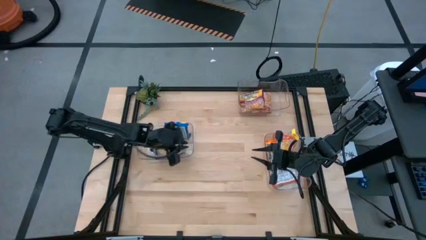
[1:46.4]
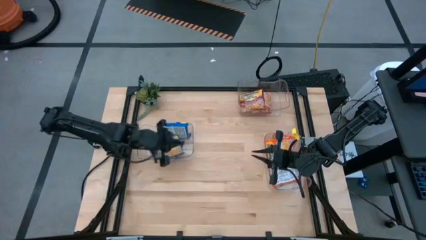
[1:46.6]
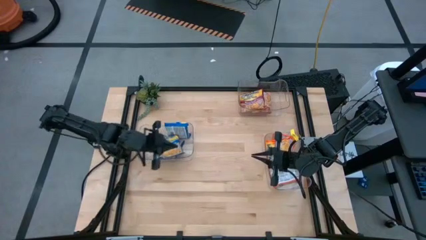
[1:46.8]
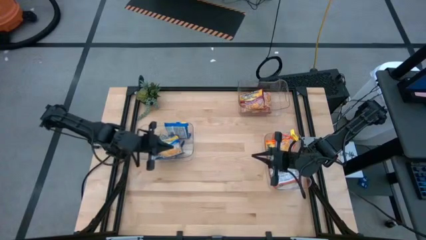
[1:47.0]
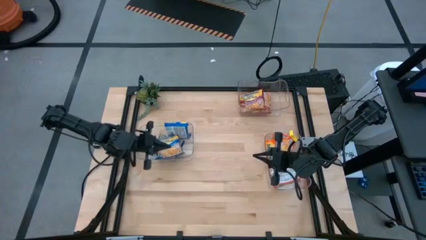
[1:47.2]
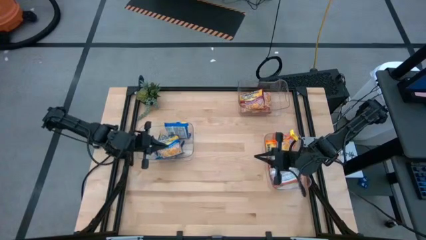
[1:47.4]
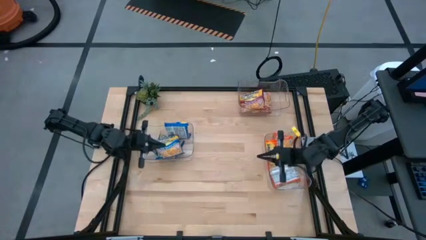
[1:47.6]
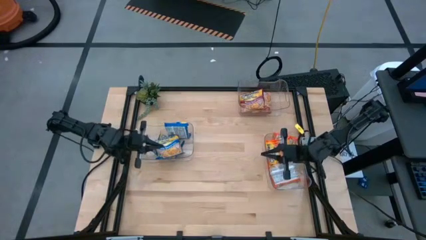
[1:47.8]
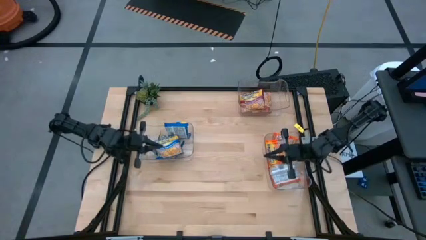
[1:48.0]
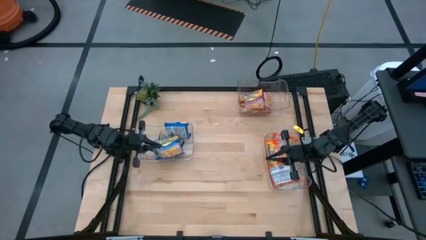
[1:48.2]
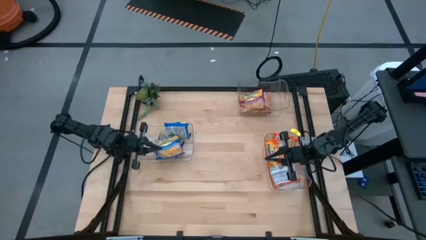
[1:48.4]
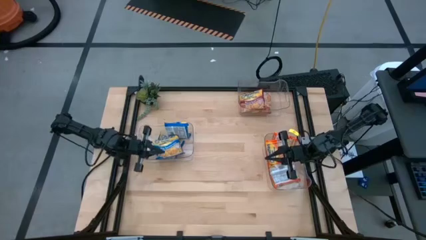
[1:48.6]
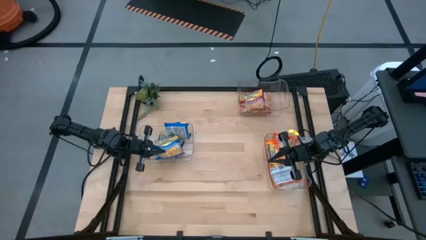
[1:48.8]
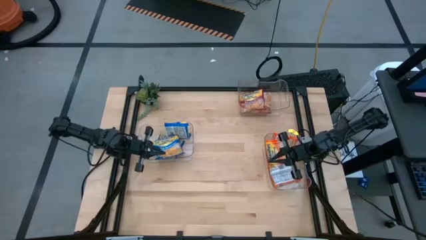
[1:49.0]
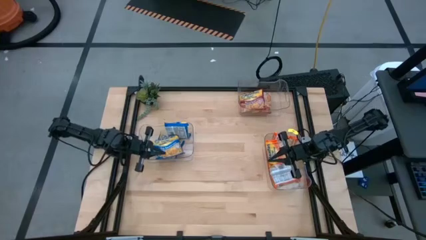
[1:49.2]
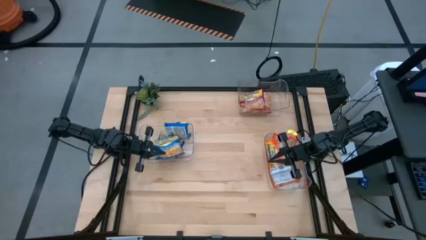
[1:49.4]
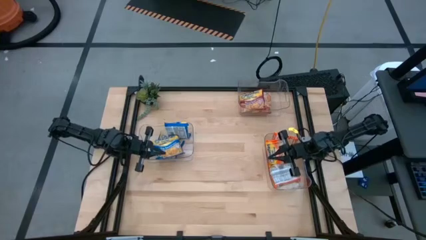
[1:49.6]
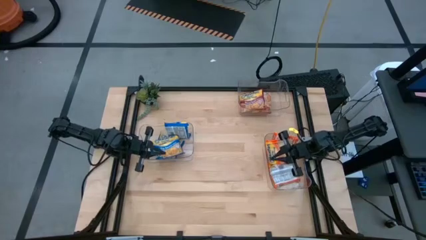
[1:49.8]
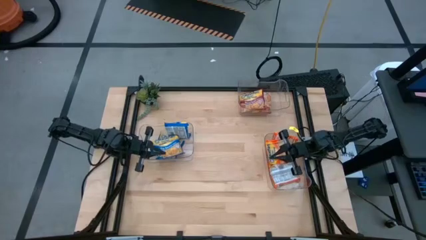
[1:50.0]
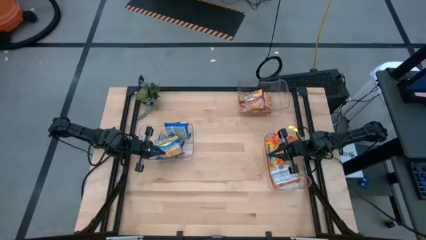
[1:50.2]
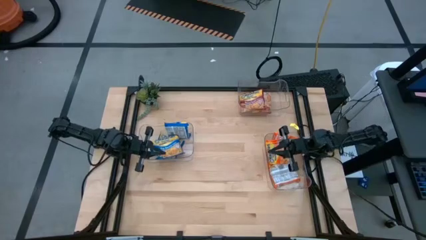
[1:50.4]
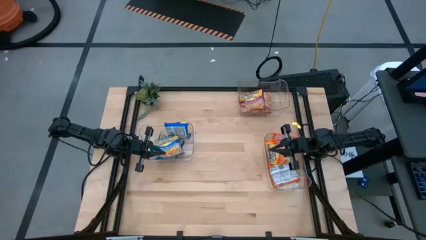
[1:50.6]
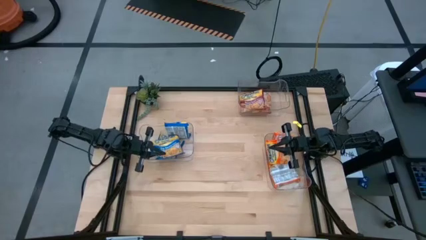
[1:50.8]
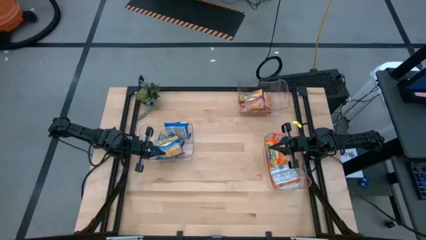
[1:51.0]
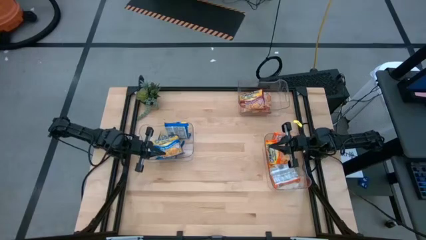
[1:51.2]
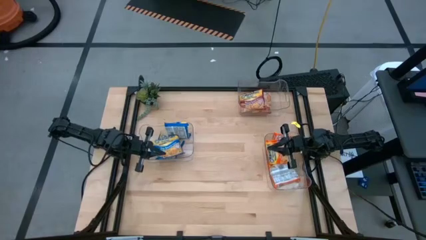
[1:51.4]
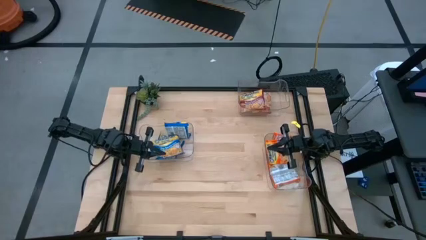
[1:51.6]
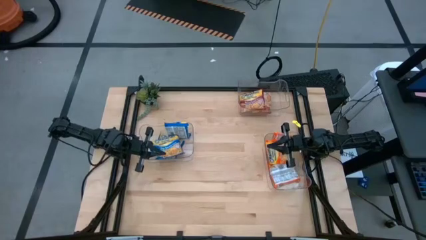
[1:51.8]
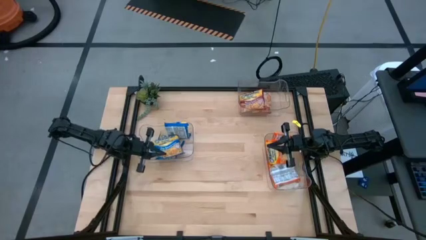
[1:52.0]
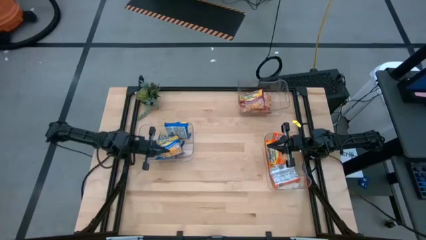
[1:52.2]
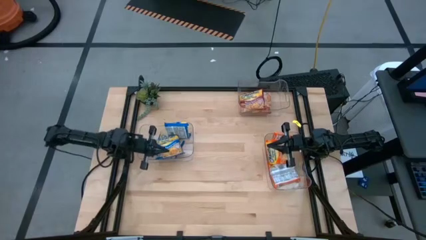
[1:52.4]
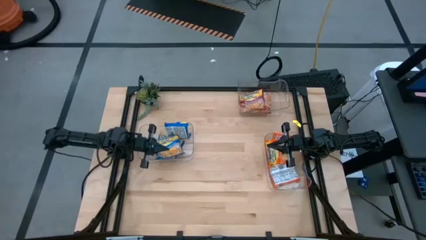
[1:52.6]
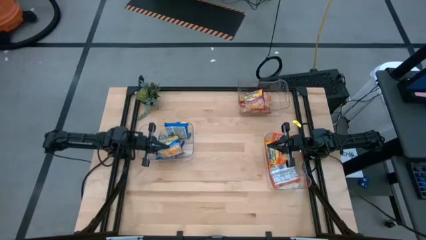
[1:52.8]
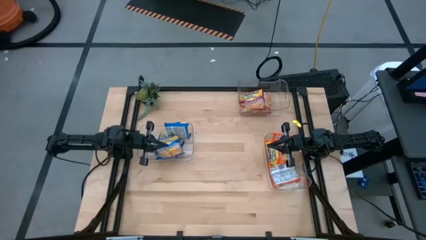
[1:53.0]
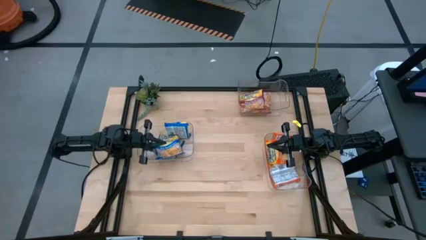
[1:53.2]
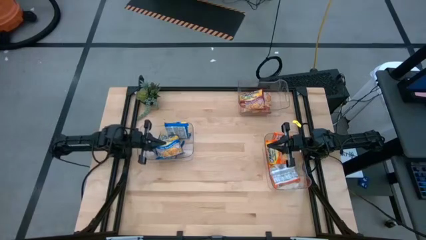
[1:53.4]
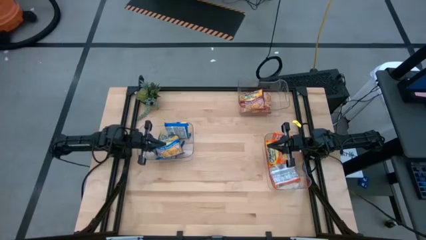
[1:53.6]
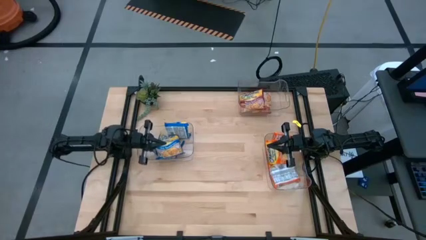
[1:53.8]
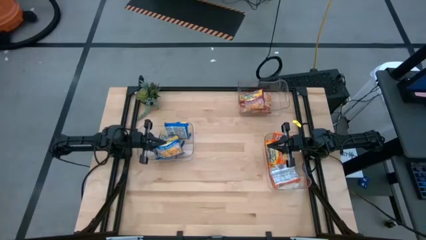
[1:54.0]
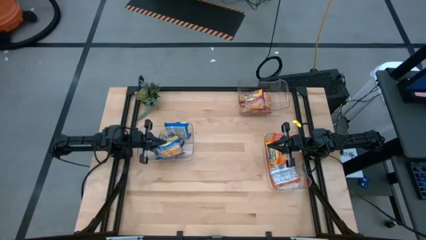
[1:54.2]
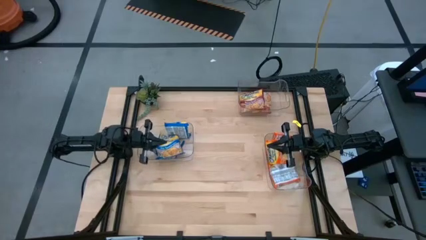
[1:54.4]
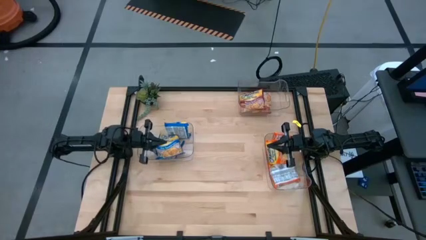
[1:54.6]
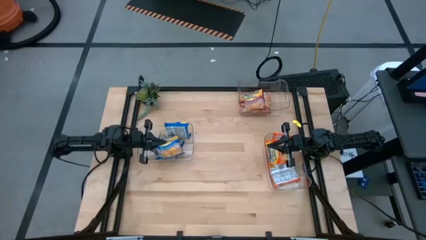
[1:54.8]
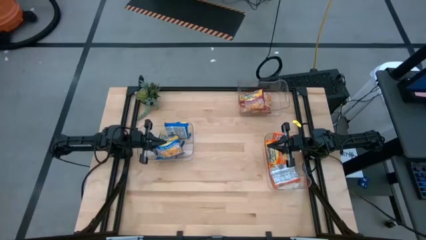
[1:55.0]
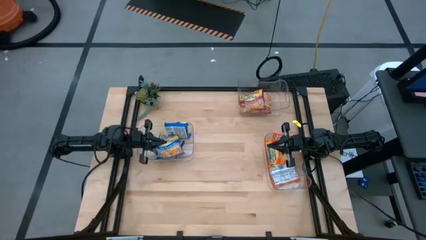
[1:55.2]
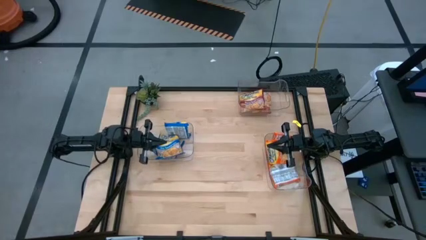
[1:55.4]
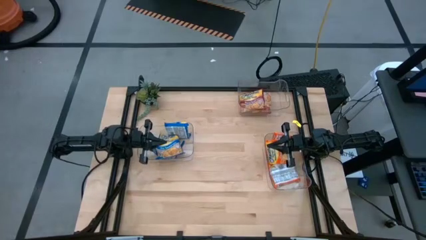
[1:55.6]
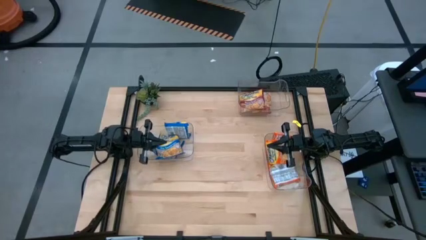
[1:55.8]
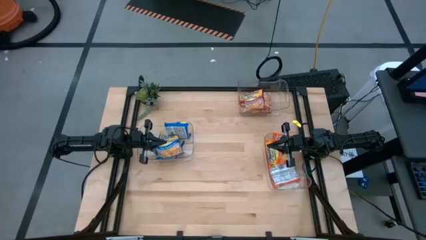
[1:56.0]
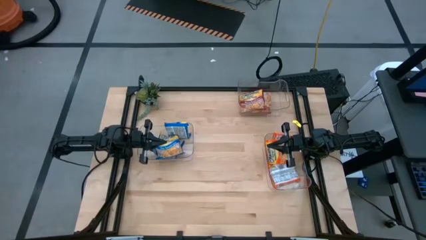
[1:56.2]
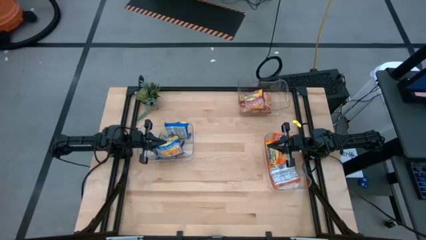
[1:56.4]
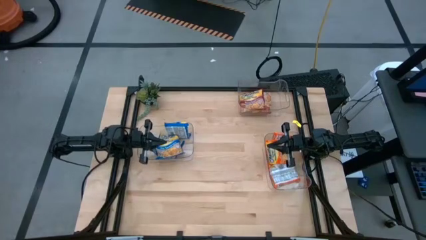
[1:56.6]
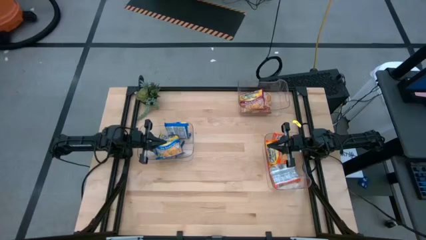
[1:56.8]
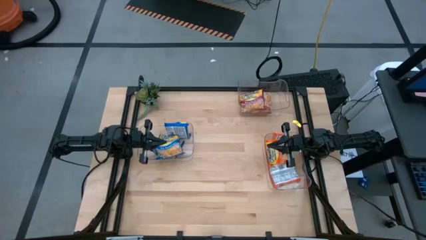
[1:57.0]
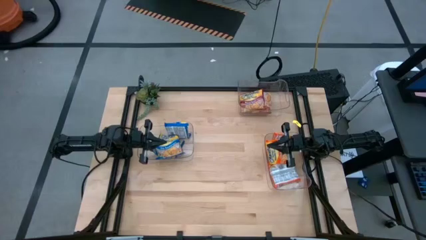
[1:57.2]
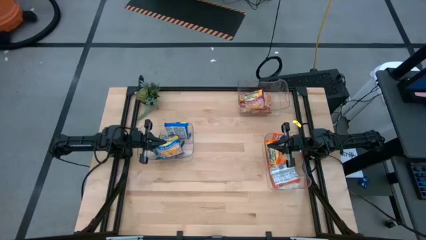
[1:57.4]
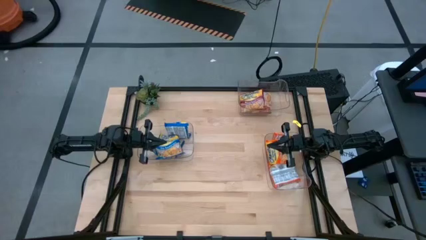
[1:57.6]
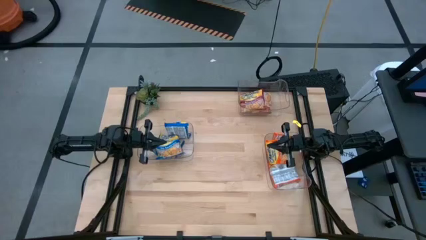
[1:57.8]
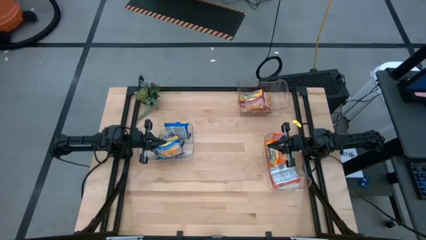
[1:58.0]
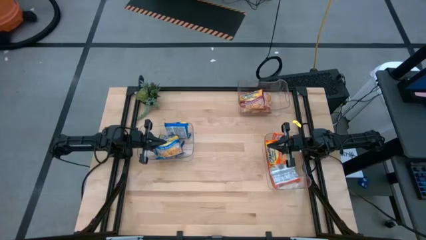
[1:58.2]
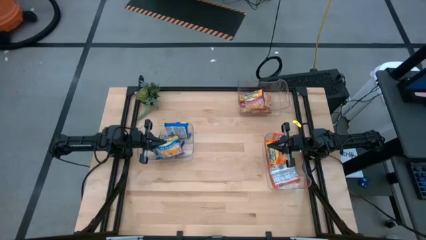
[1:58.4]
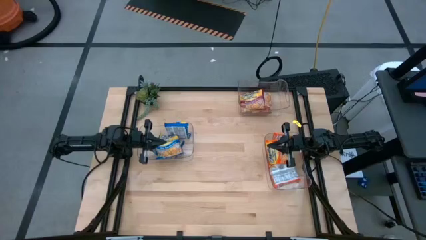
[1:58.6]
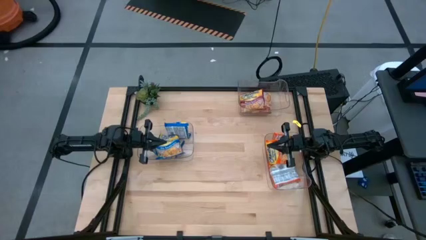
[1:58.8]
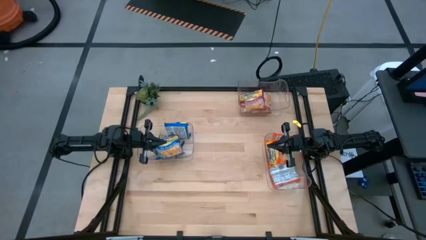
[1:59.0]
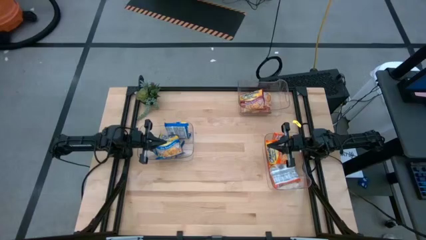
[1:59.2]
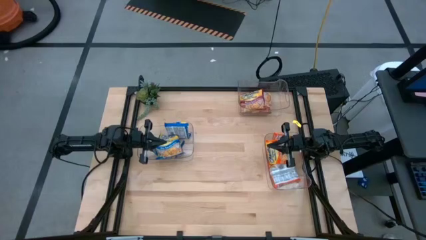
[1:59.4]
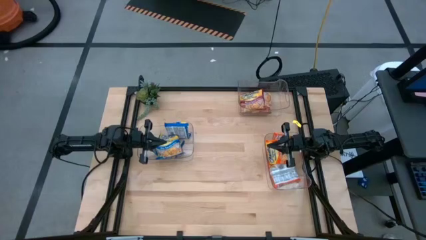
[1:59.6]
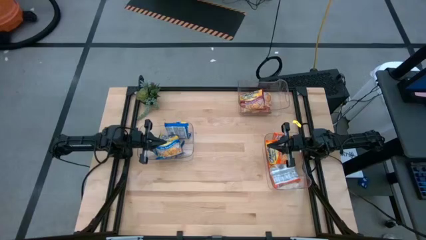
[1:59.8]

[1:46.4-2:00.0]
Task: Sort Maruchan noodles
Return to Home Position

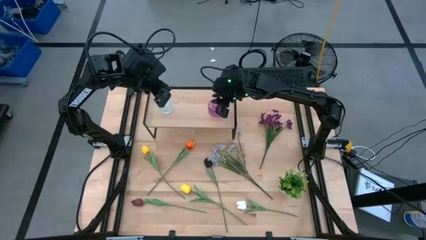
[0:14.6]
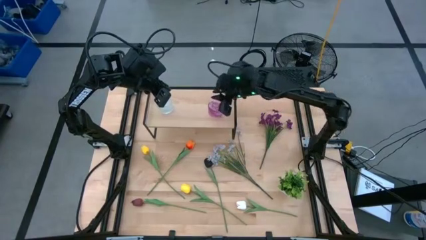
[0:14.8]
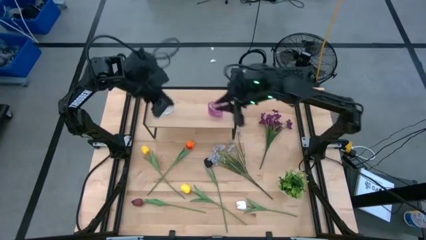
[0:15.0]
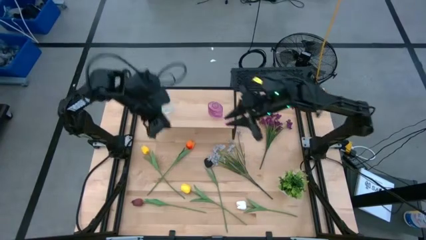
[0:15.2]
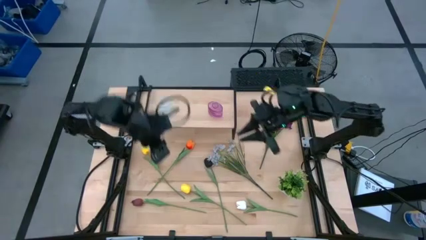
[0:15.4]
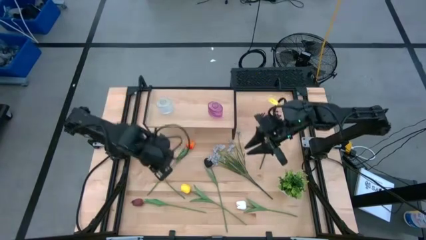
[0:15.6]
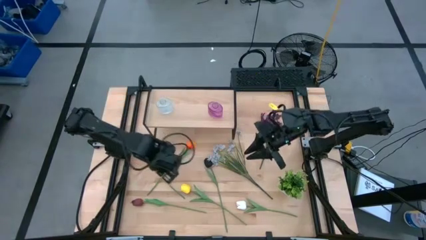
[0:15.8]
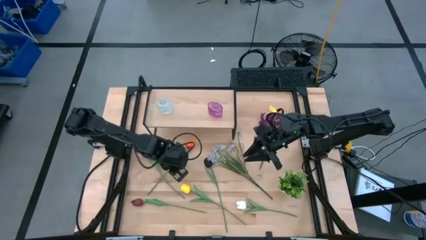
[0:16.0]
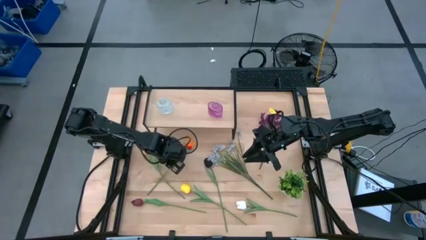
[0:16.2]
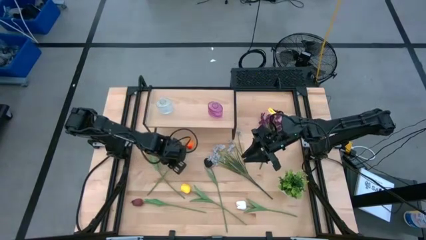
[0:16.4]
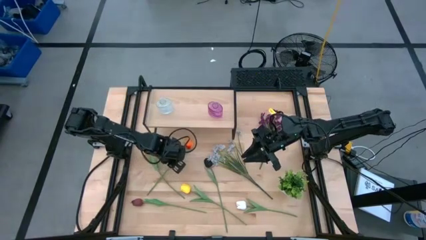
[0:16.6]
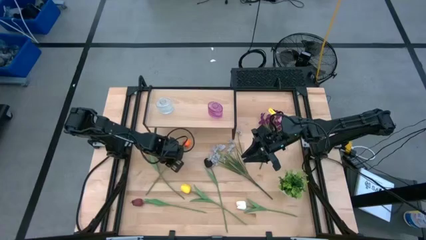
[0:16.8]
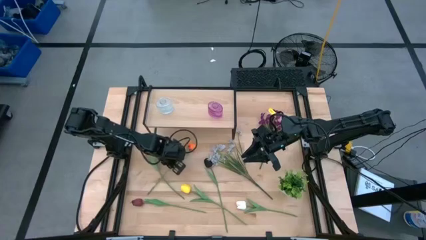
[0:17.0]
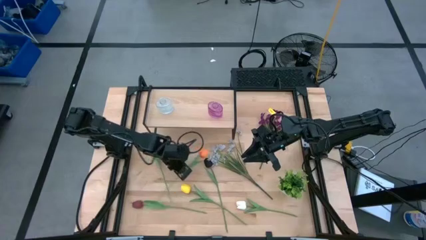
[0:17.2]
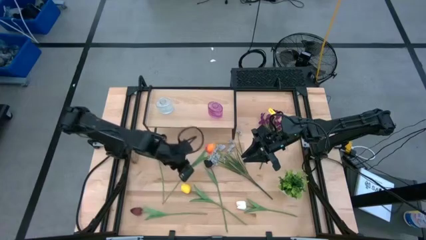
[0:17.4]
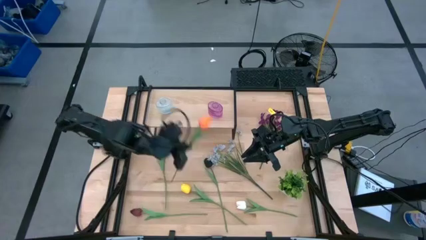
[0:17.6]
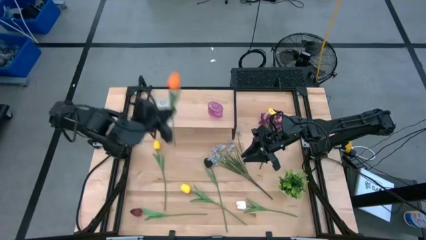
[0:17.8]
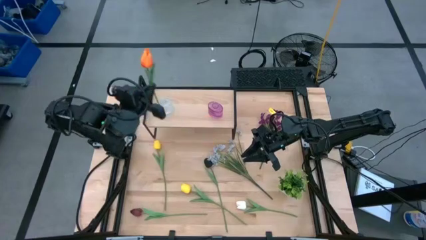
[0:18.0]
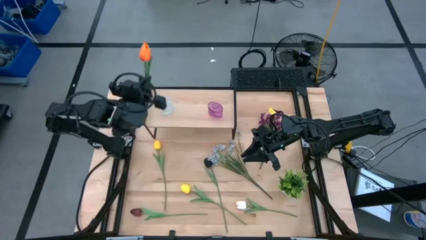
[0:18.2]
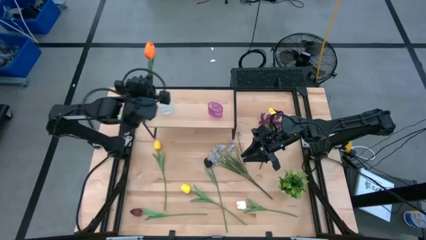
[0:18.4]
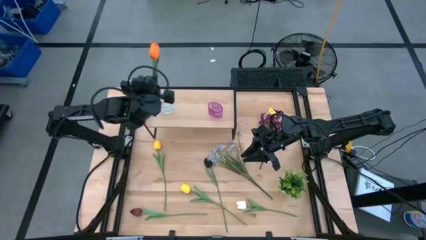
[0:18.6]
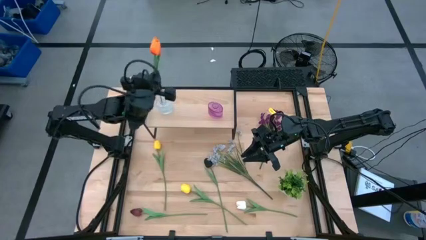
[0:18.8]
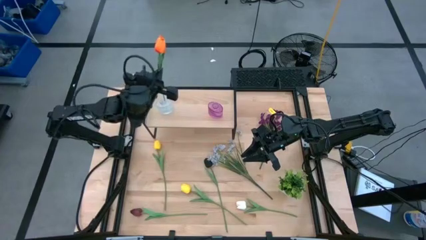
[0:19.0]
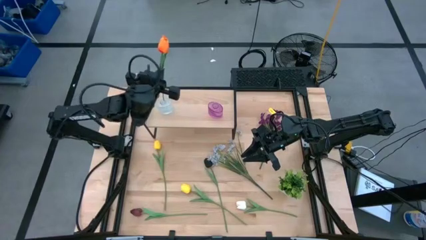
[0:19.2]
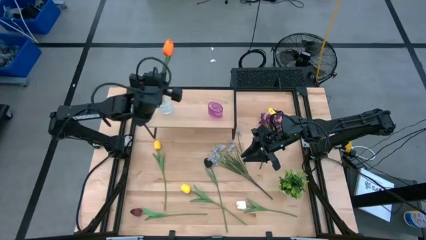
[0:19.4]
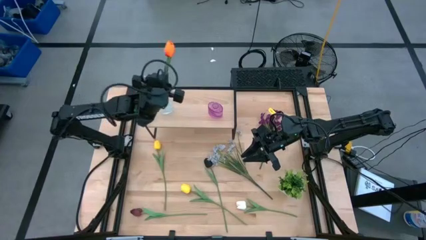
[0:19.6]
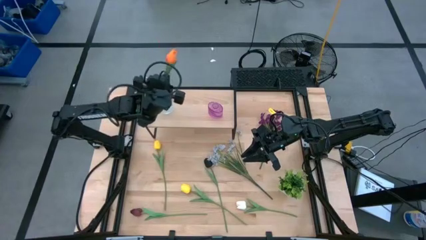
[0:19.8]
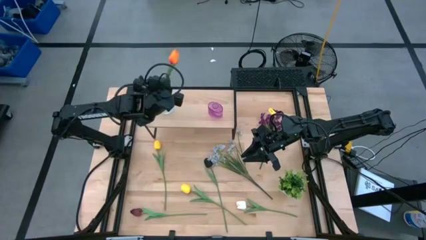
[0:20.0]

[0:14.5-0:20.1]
Task: Pick and place flowers into a vace then onto a shelf
Put the orange flower into the transparent vase on the shelf
